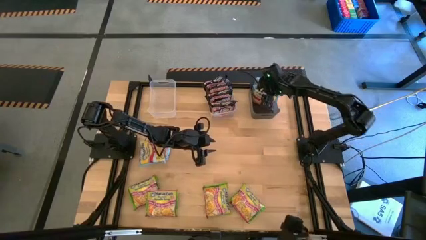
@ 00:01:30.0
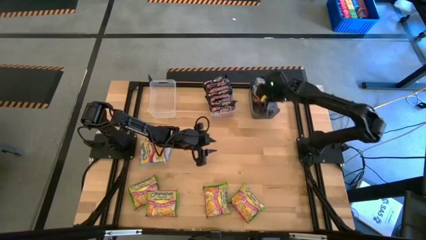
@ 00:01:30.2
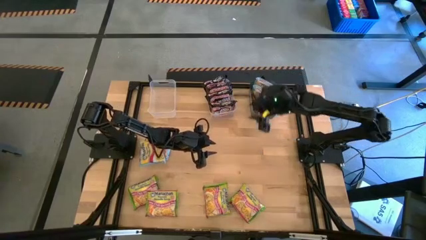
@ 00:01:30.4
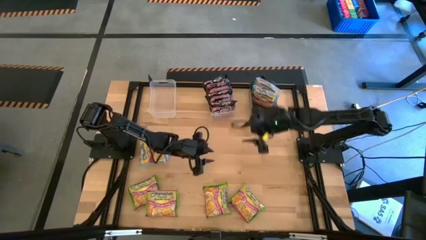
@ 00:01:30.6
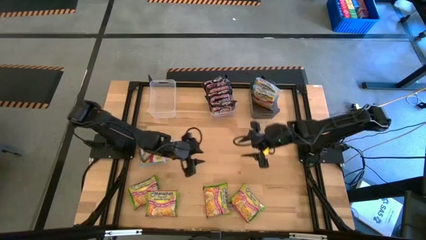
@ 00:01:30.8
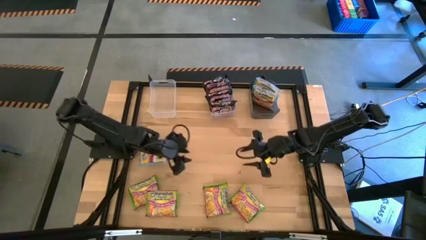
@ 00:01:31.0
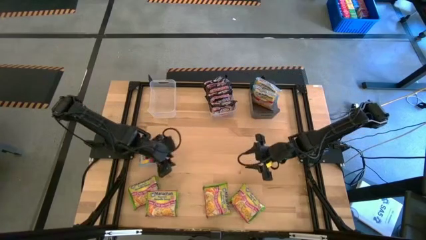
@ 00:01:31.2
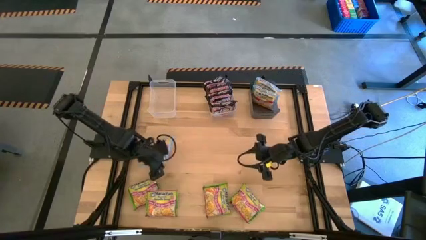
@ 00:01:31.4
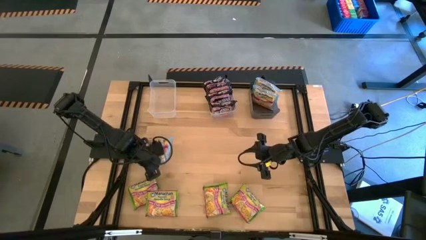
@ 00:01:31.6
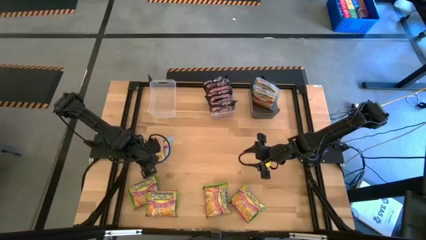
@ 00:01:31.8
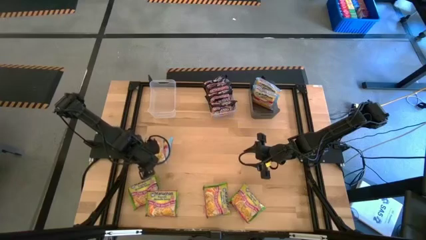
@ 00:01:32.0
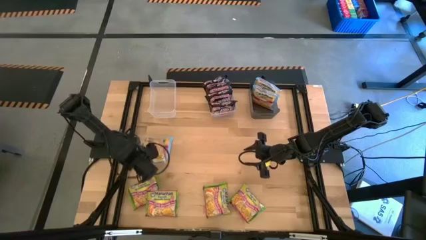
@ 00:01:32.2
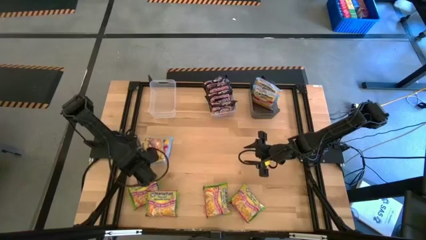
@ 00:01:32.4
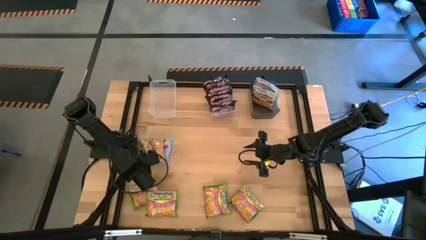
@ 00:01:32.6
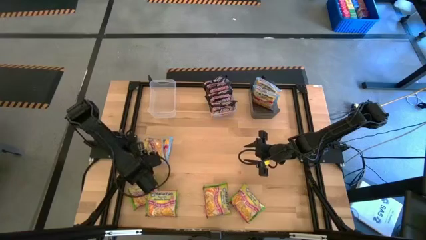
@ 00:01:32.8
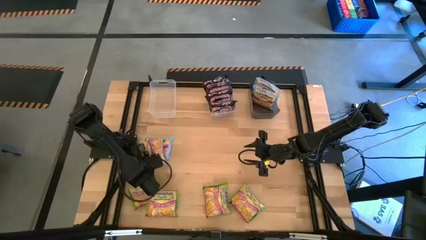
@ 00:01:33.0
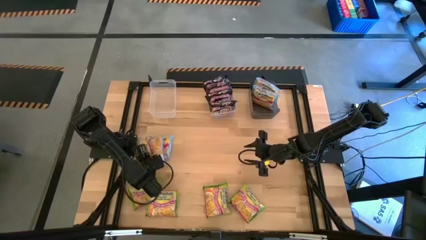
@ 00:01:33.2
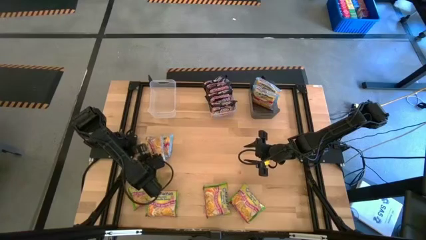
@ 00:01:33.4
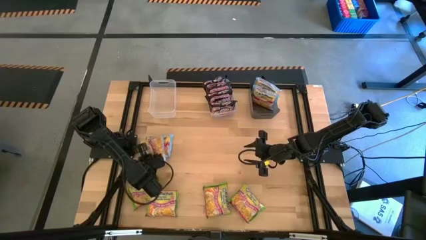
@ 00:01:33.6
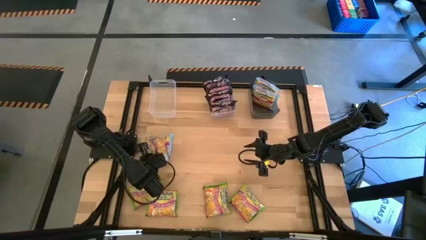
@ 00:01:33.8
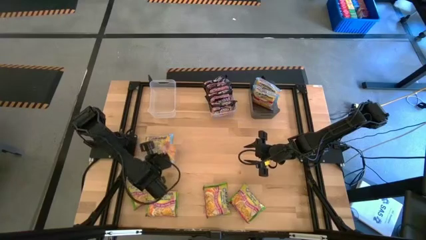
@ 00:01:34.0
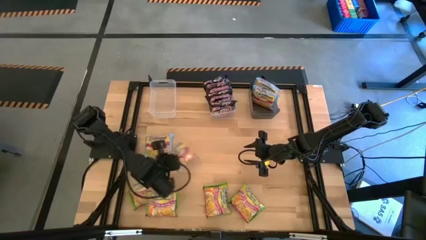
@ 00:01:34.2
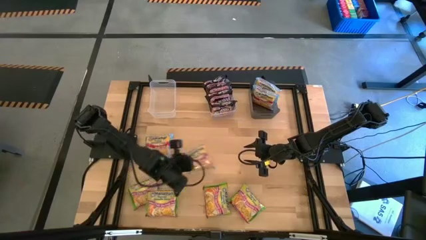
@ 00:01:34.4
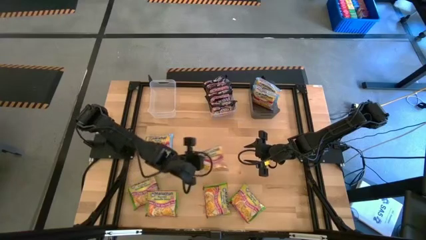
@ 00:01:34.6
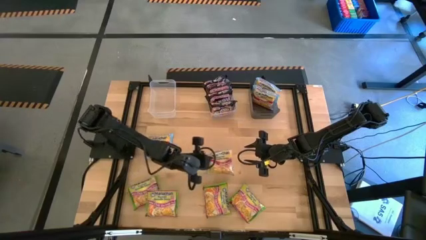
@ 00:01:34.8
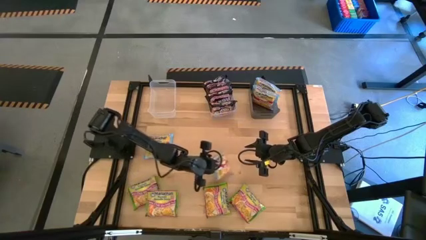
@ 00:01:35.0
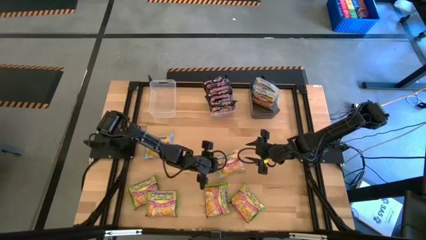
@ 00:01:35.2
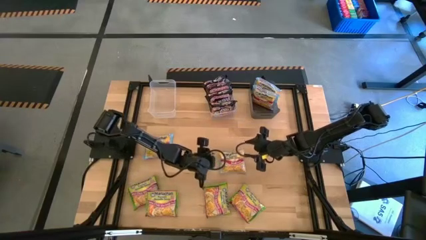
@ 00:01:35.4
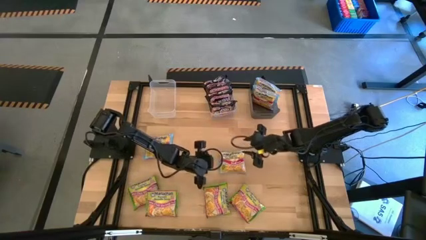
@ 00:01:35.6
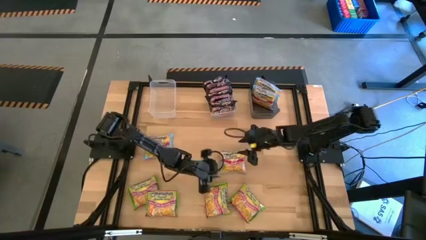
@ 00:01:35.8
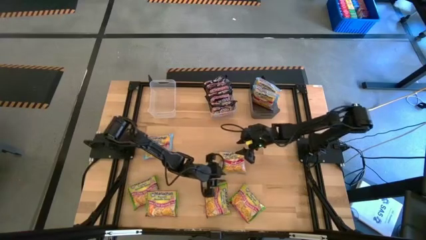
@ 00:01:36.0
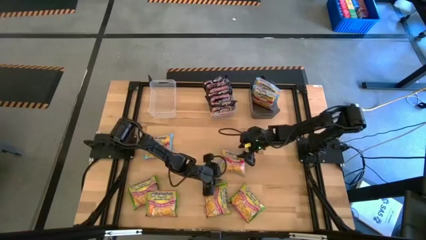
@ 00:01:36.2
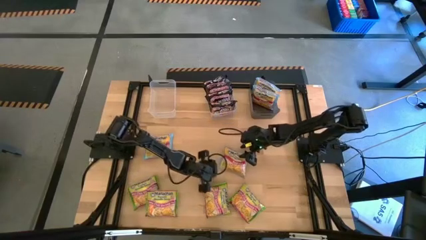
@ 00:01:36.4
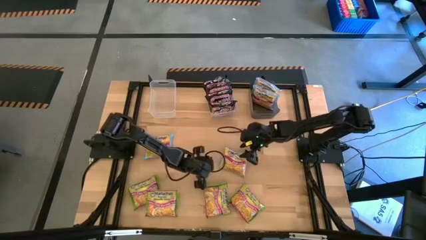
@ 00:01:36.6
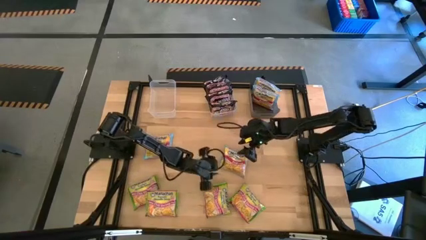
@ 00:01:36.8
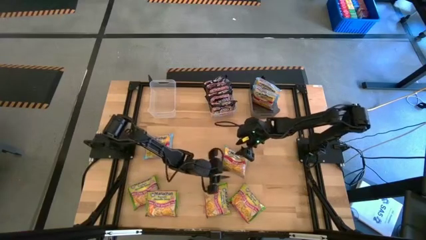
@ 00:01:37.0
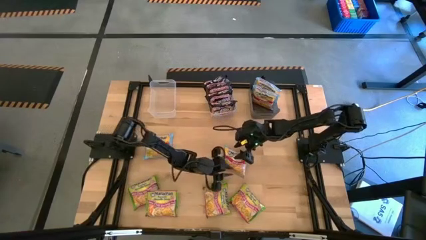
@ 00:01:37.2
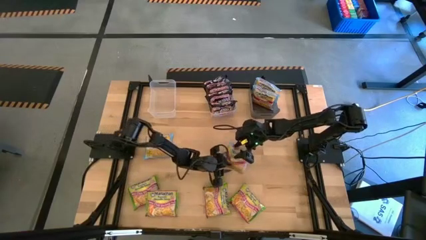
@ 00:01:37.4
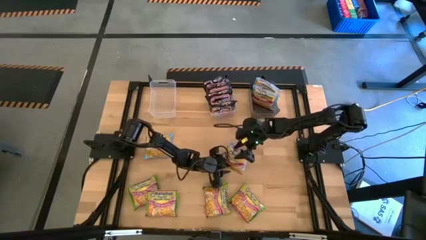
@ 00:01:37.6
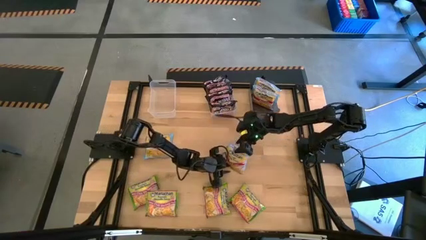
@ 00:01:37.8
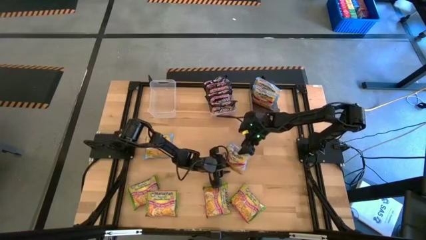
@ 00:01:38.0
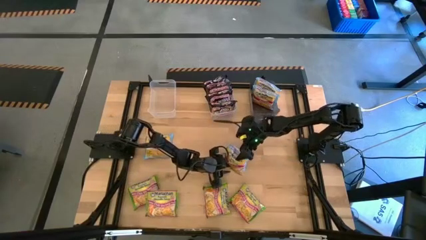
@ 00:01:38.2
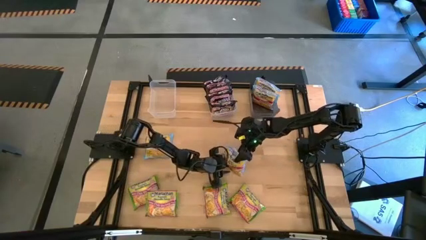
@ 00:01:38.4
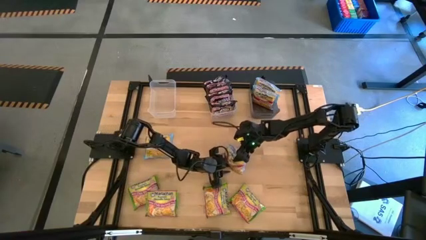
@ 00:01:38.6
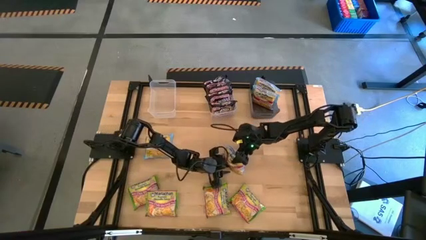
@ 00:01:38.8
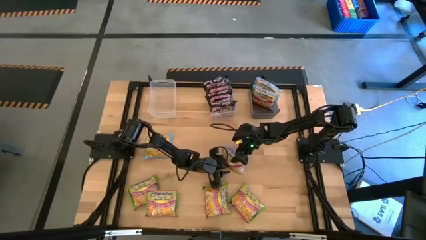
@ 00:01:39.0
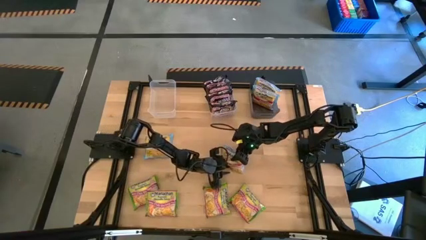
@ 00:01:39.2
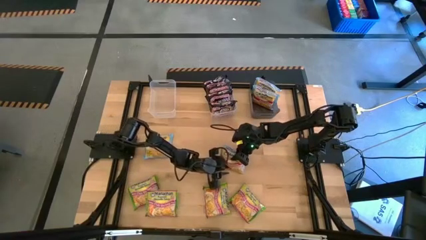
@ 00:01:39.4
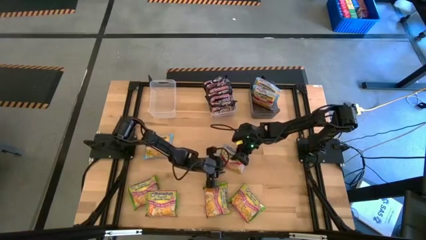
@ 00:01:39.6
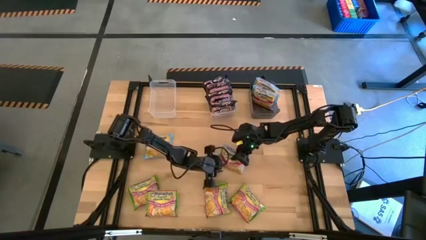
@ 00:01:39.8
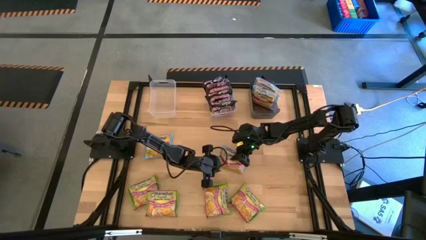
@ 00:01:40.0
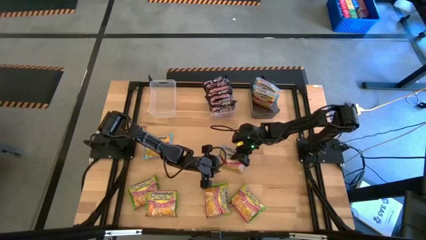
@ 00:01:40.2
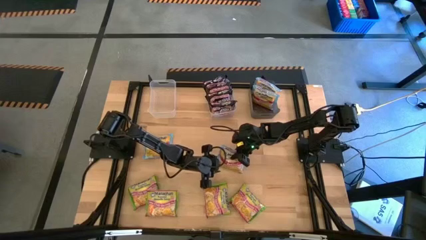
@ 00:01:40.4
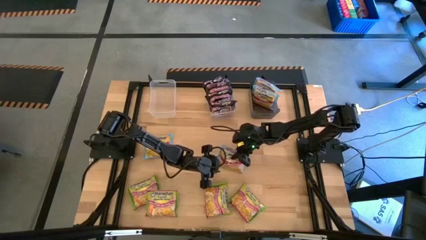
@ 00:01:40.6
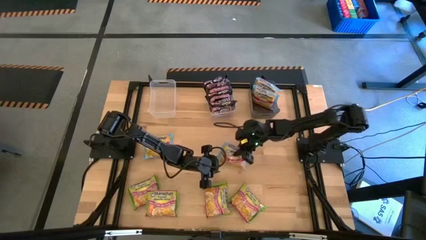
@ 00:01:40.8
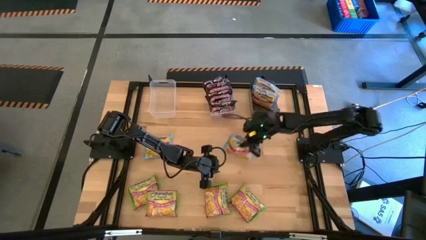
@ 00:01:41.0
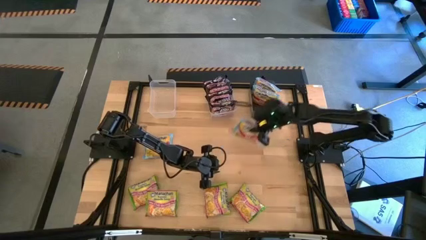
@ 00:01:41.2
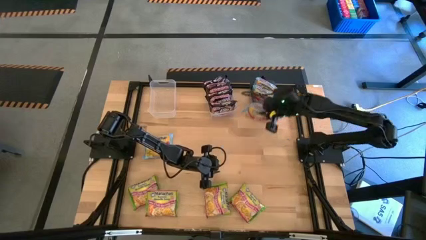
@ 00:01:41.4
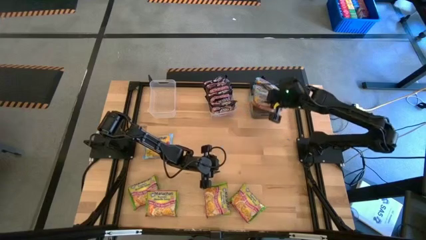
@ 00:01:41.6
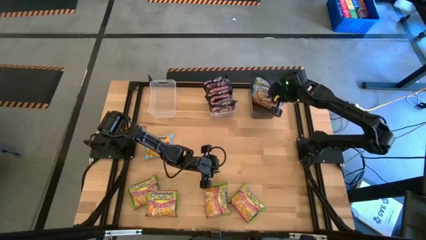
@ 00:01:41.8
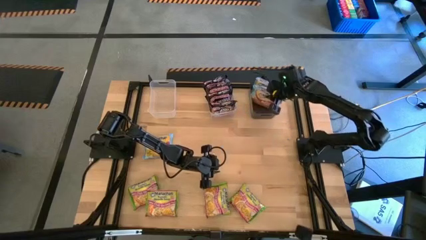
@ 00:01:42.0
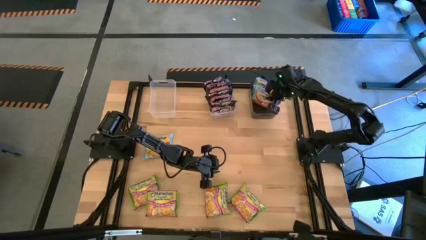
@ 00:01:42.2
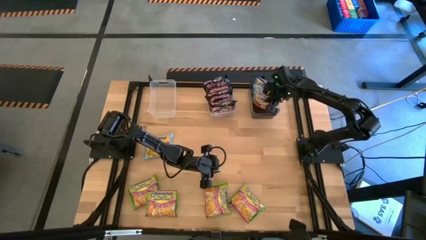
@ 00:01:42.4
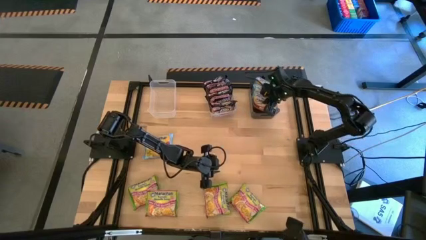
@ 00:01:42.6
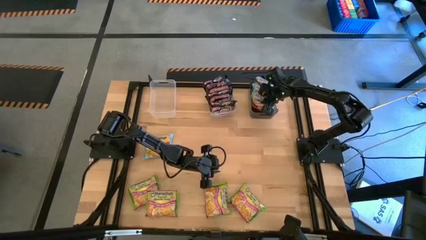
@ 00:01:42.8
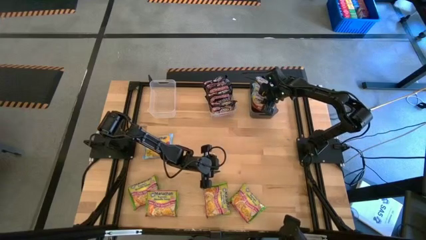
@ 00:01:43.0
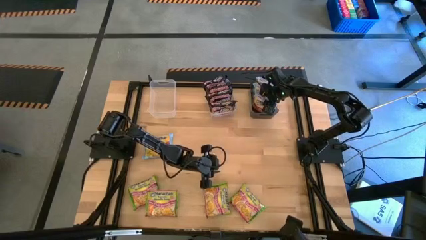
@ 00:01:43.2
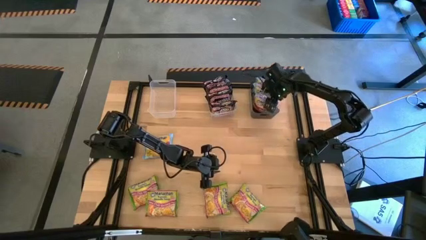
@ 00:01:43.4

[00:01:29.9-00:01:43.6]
Task: Sort Maruchan noodles
Put the blue noodle pack into the black bin
